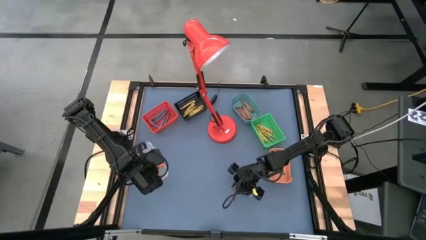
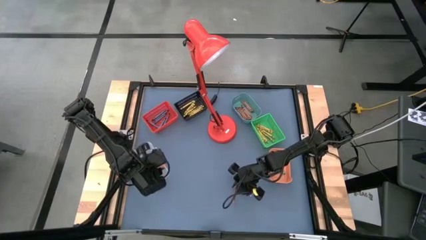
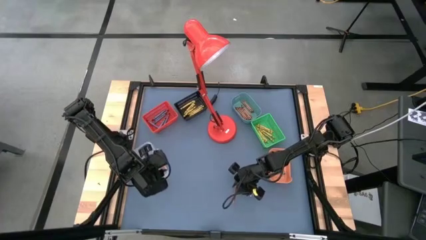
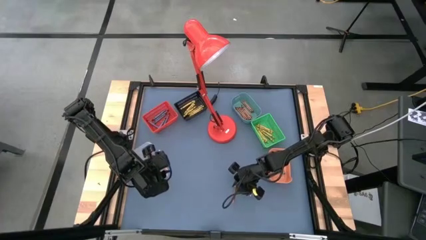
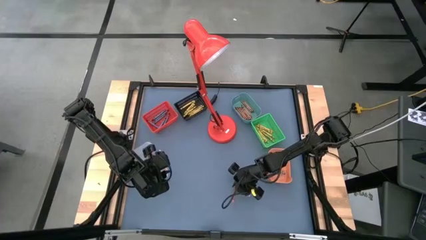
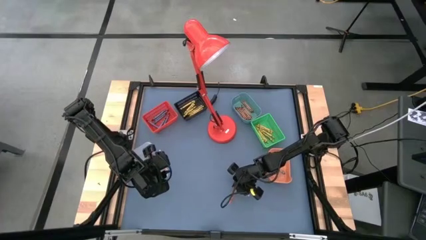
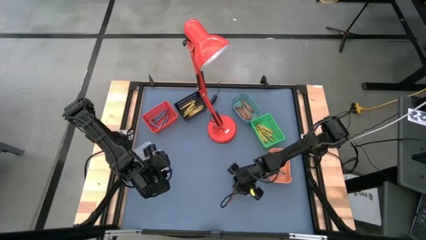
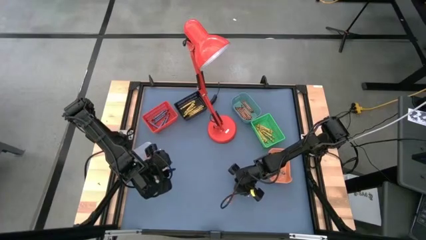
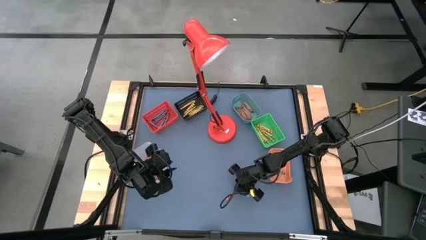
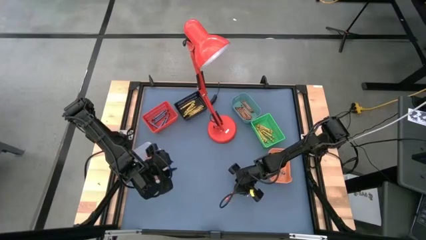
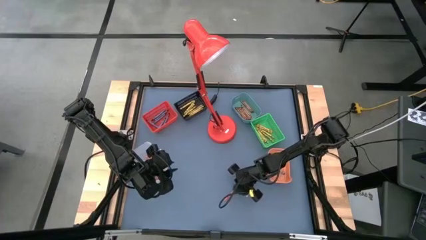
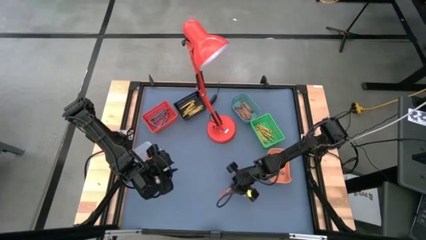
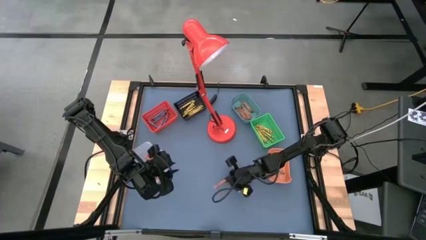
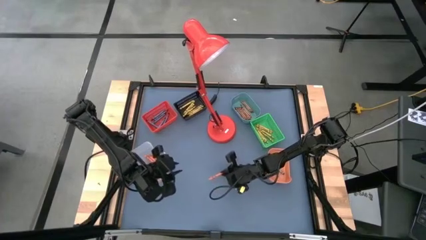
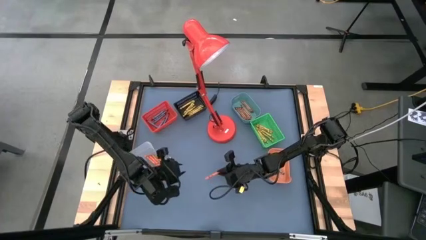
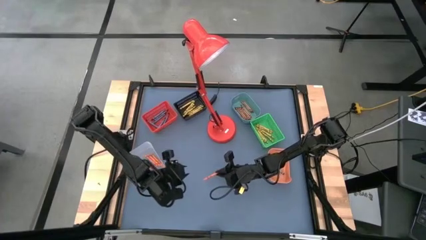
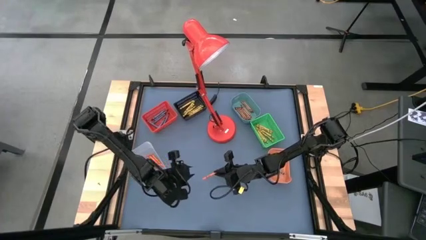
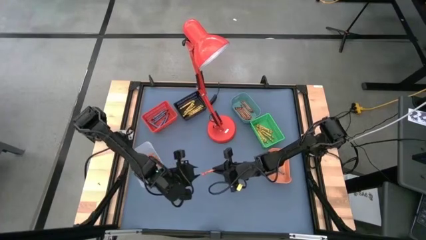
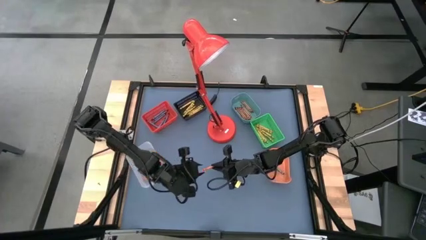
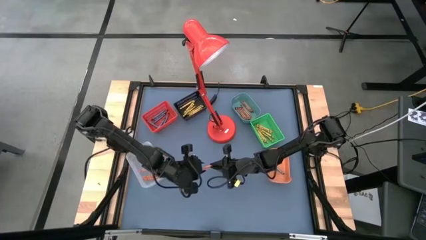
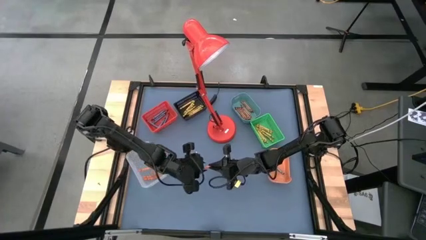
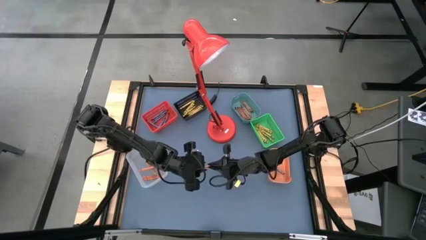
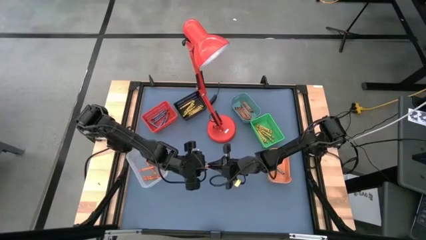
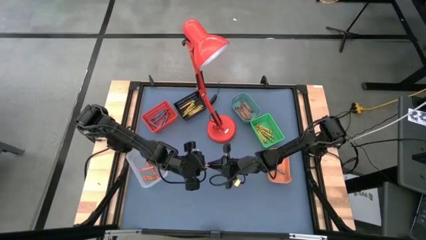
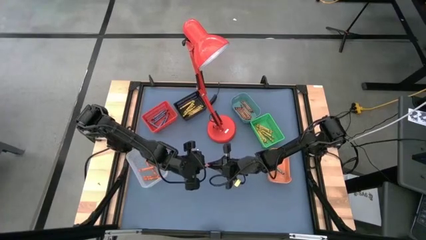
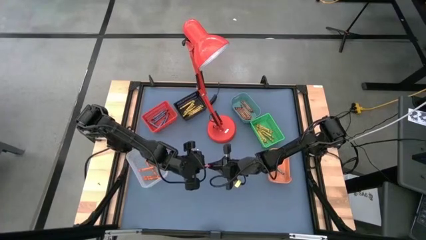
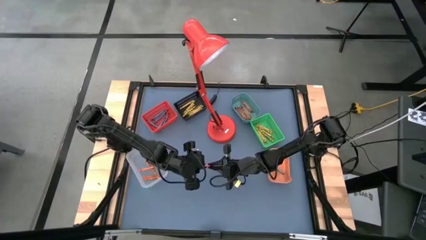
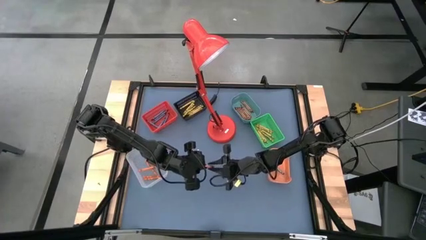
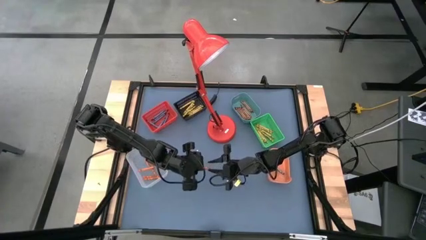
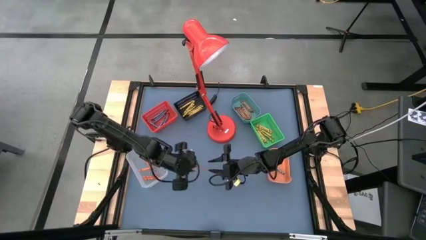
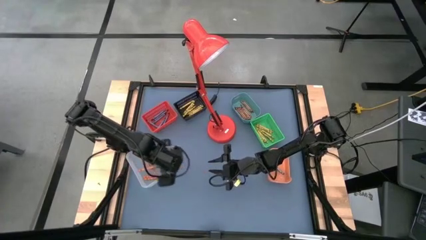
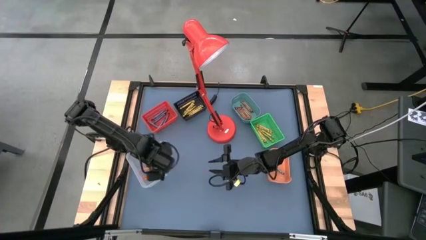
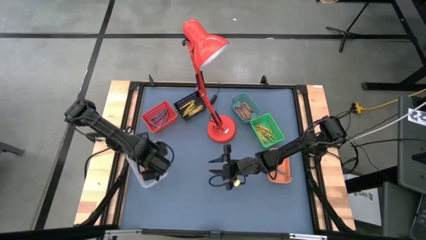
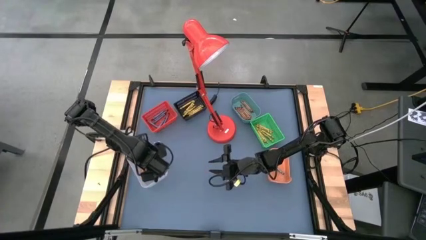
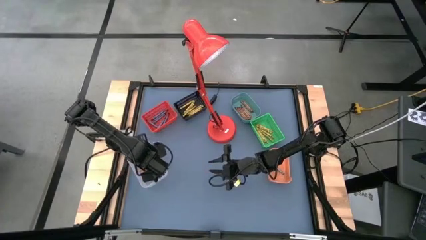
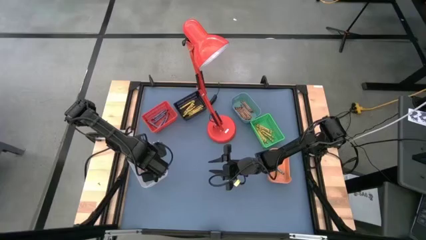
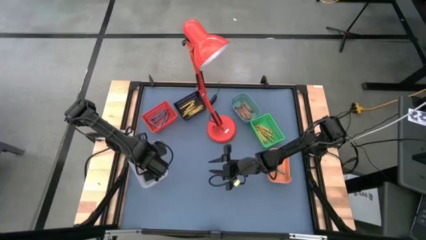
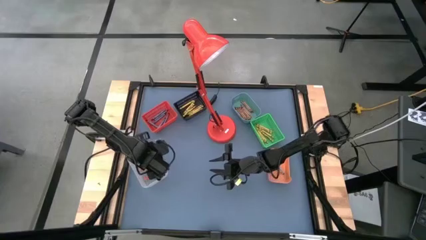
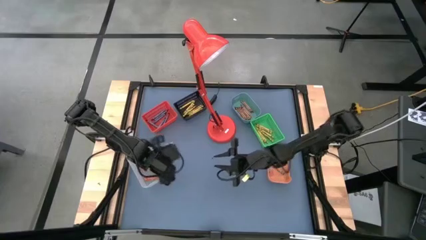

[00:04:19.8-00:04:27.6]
Task: Sort crayons
Put the orange crayon into the bottom left transparent bin

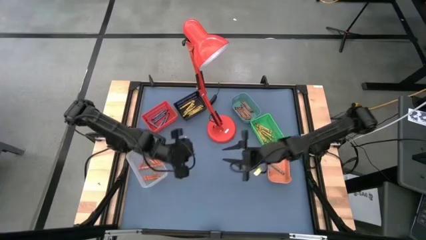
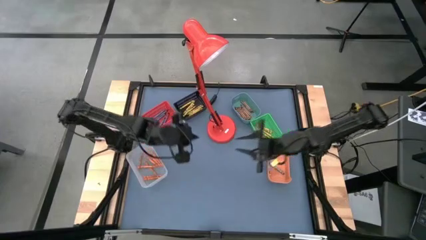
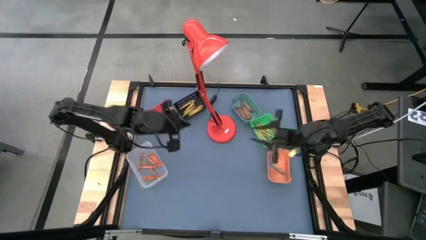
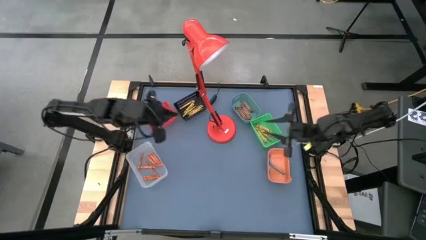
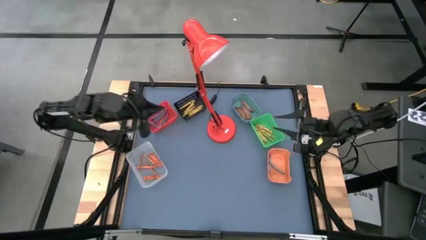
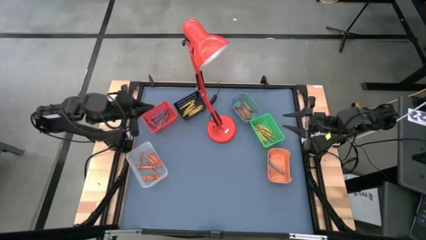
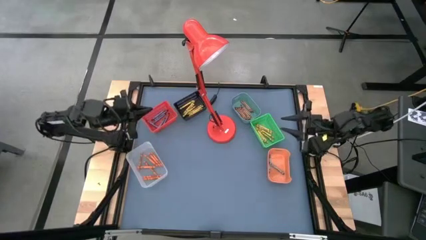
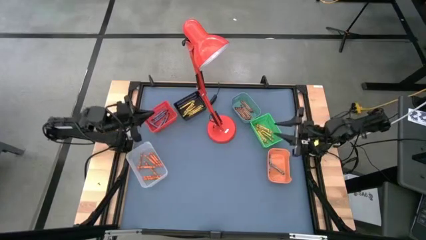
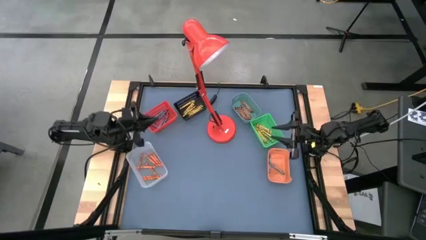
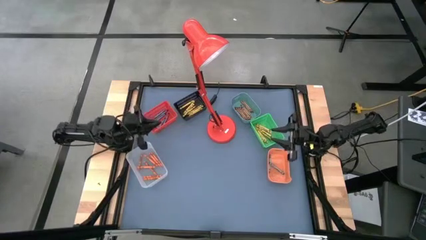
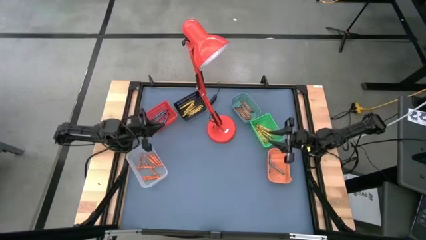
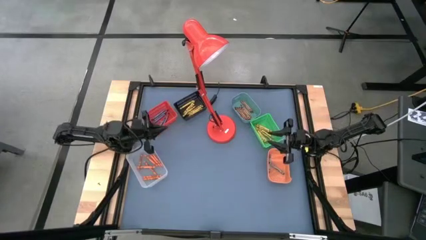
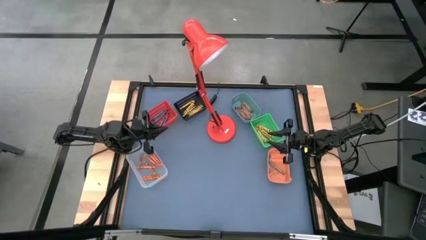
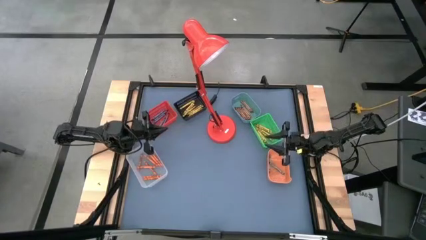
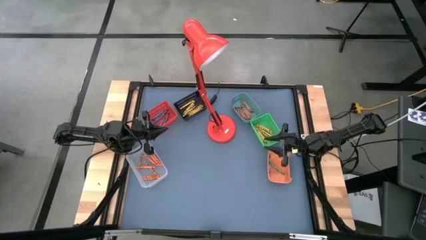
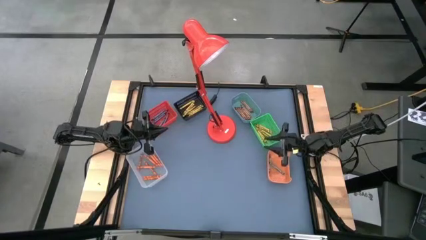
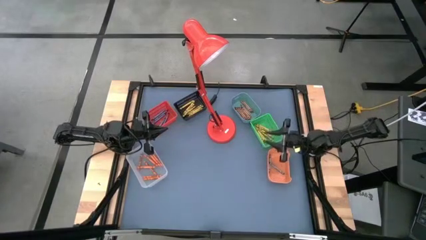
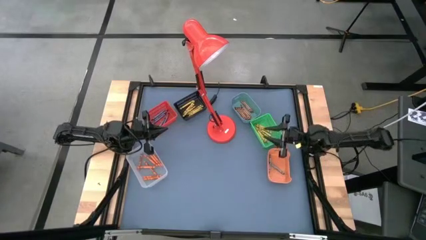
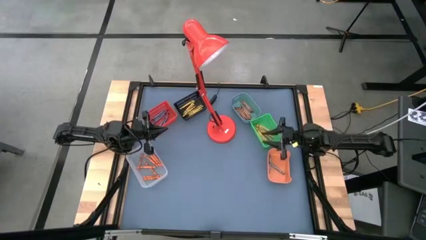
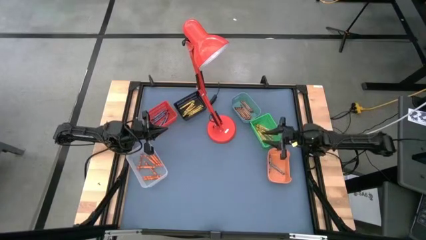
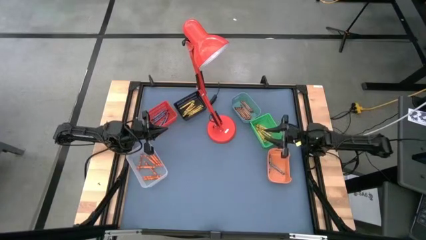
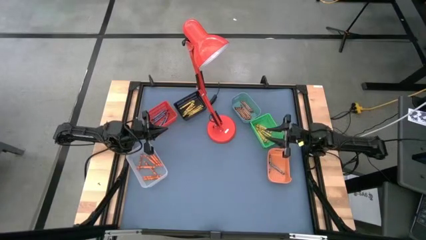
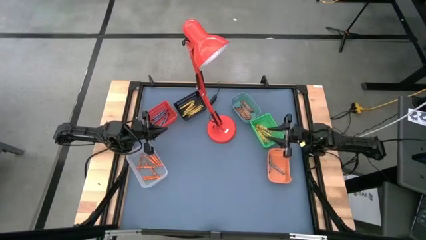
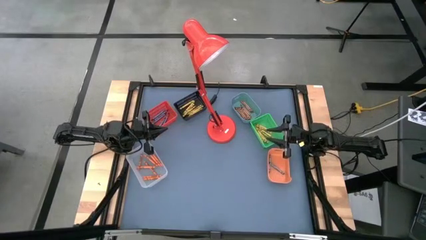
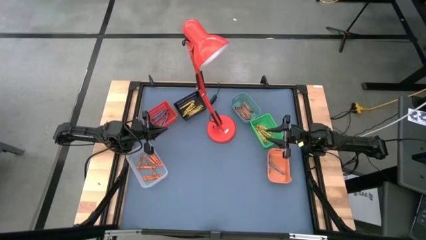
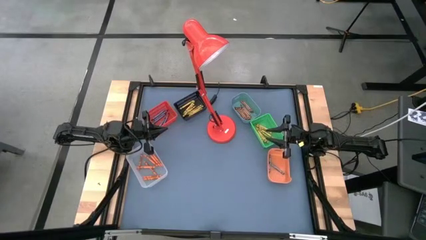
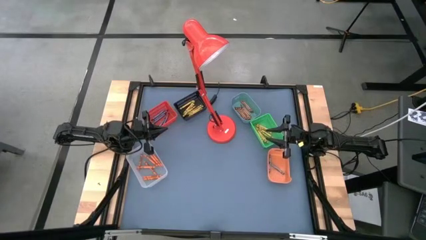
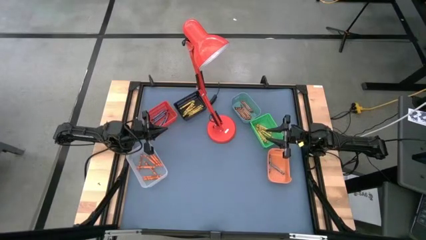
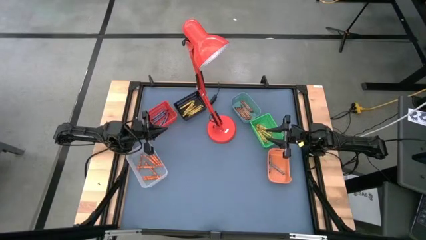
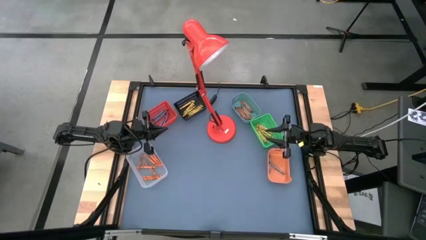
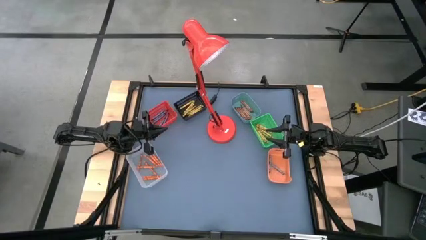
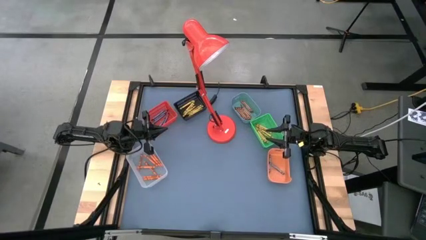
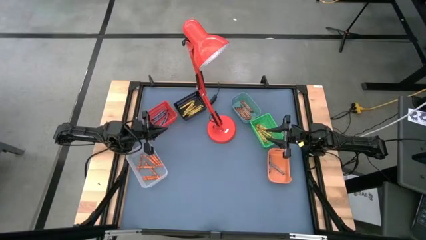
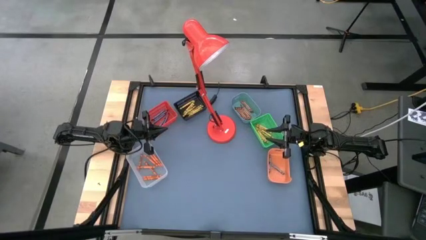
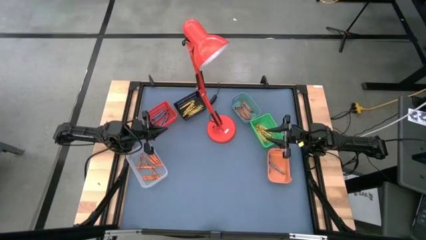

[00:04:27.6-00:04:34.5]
Return to Home Position

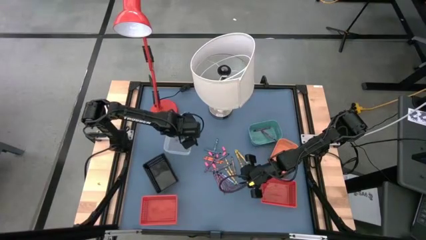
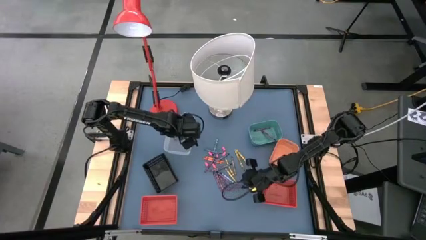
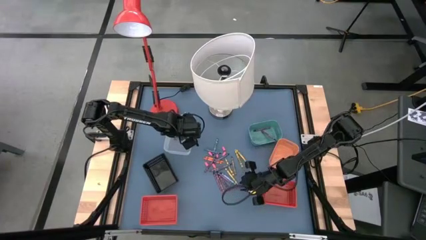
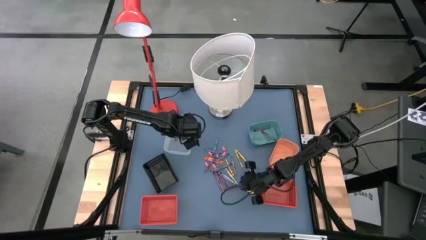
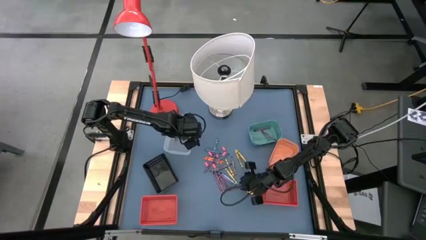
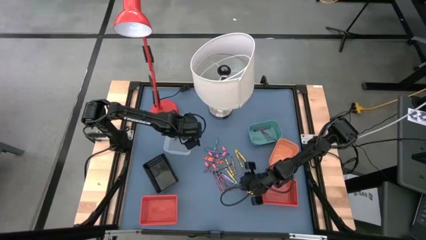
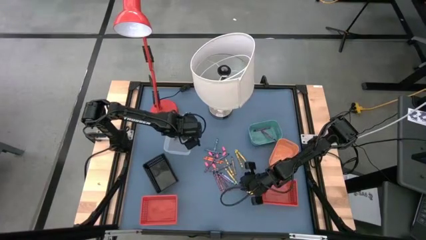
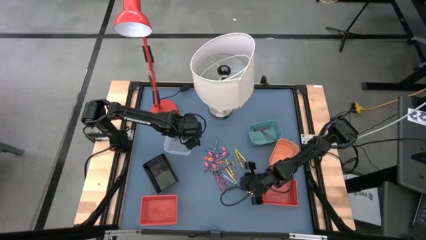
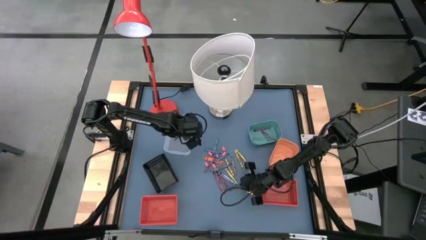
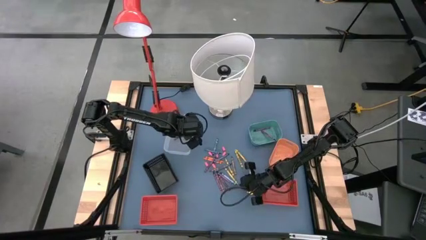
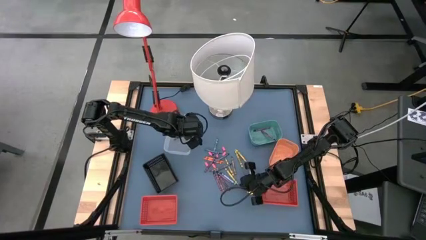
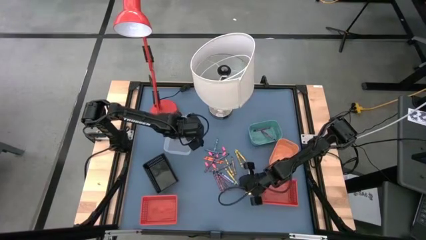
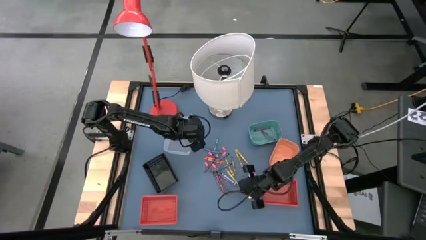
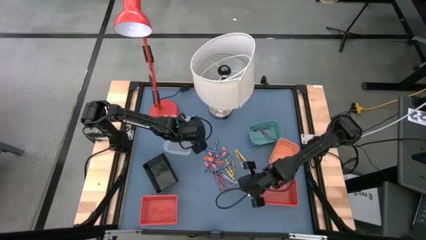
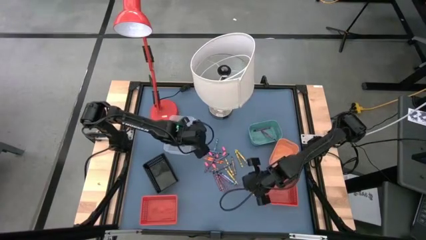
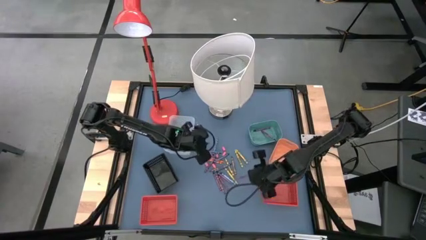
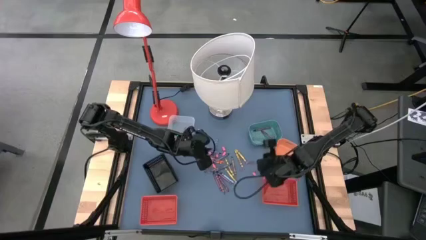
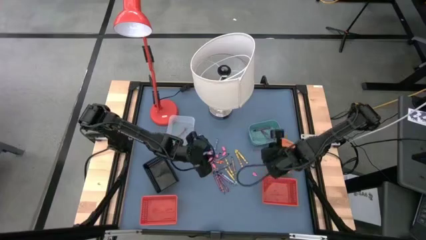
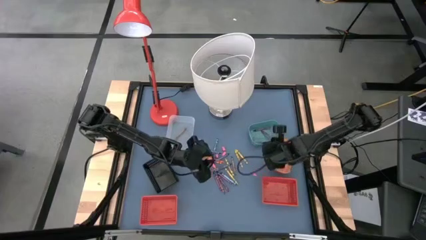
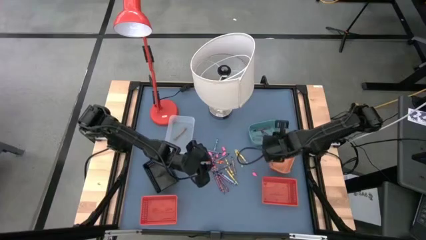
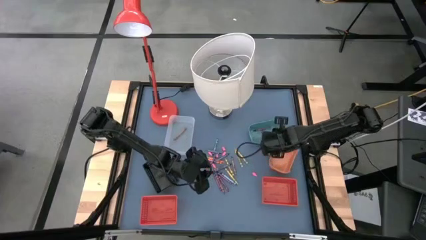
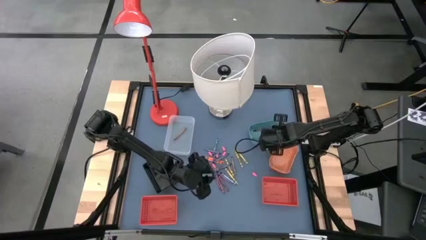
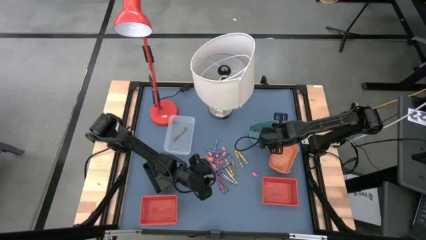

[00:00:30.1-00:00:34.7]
Task: Sort crayons
Put the violet crayon into the green bin
